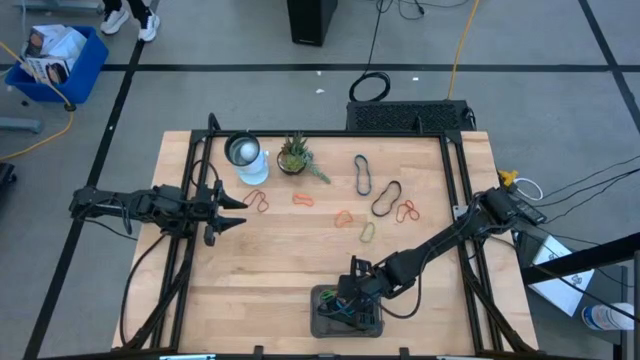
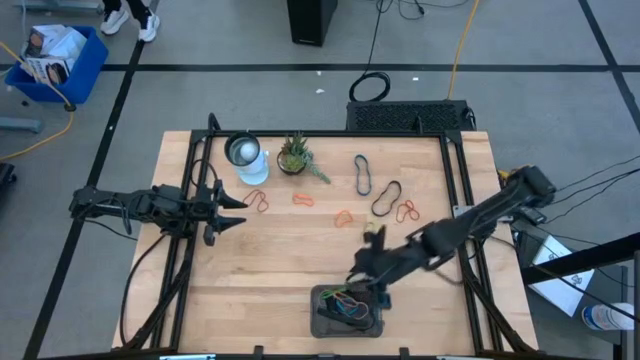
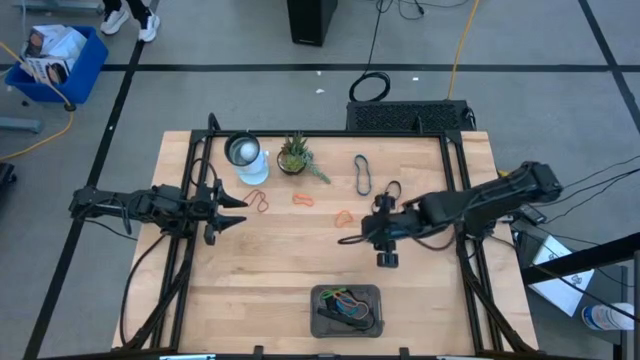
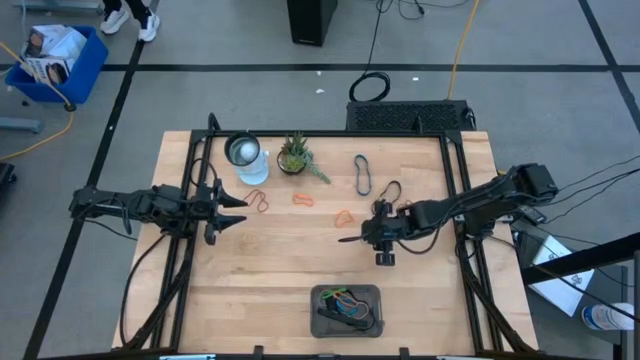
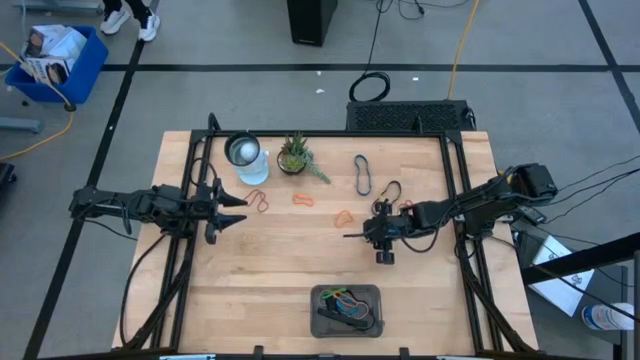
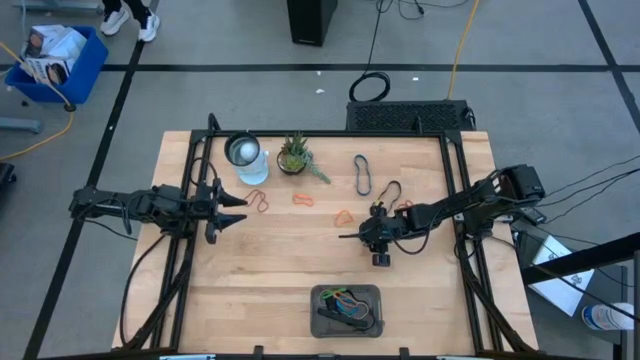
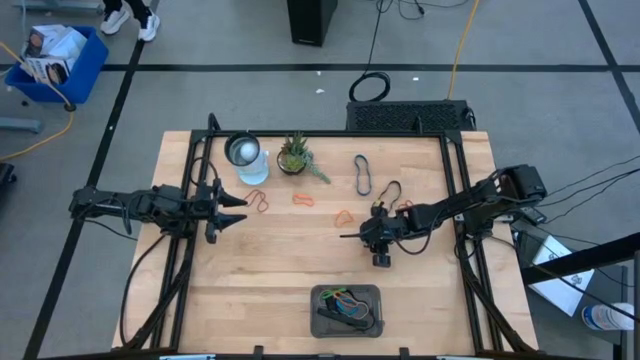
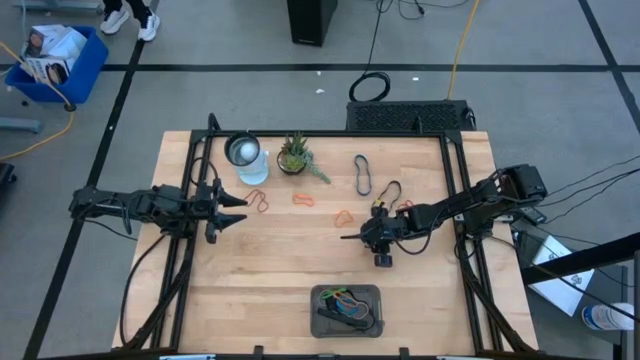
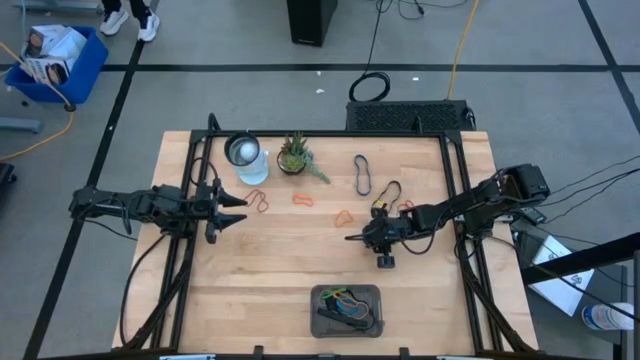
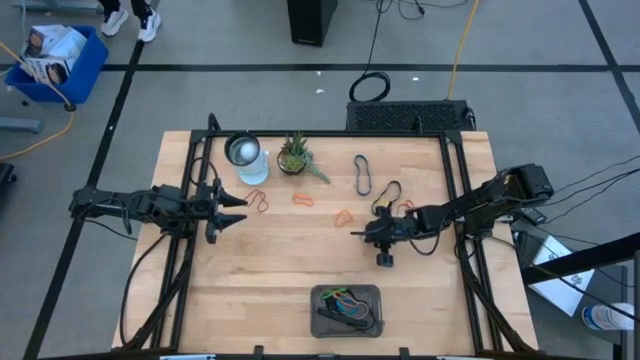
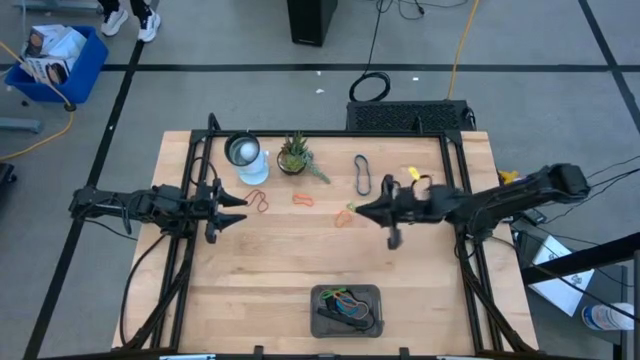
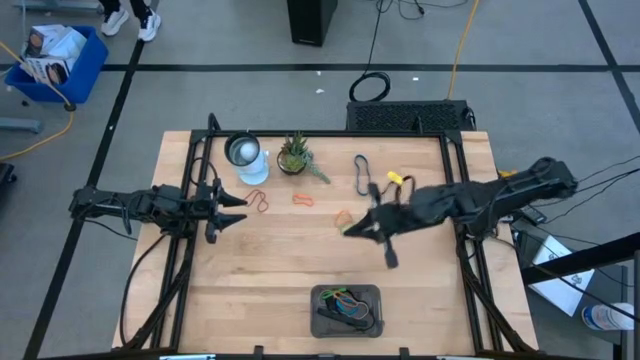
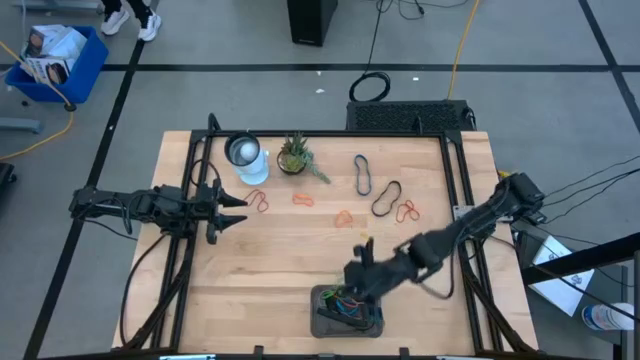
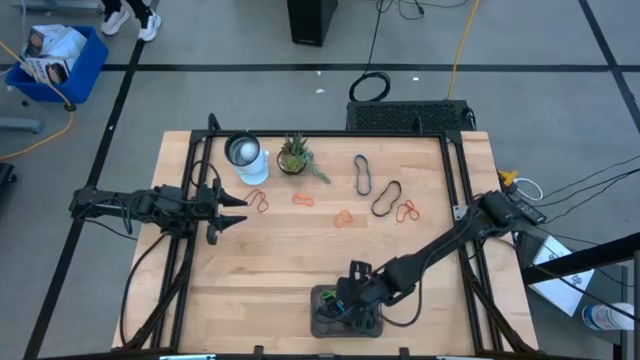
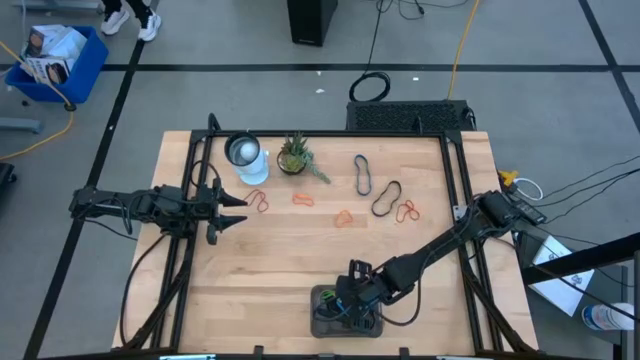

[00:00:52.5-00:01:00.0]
Task: Pick and place rubber bands into bin
Put the green rubber band into the black transparent bin

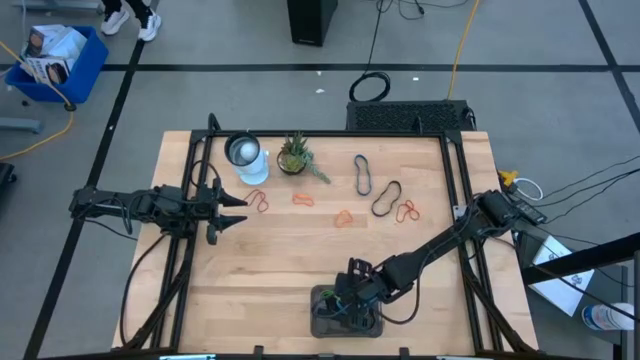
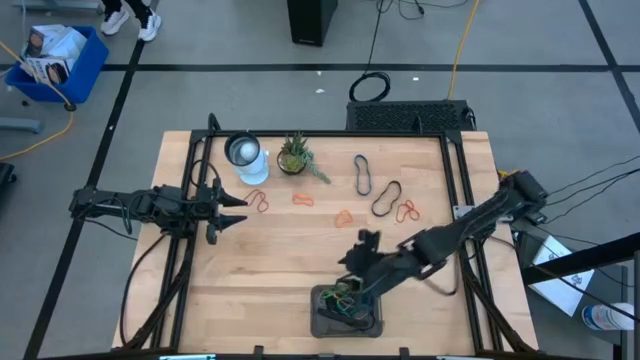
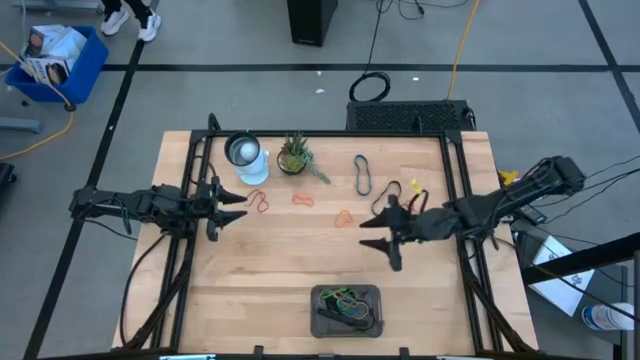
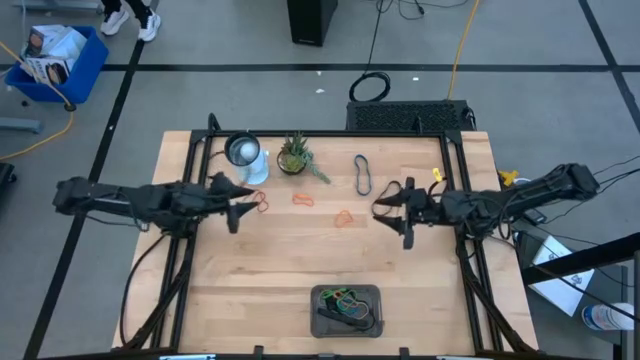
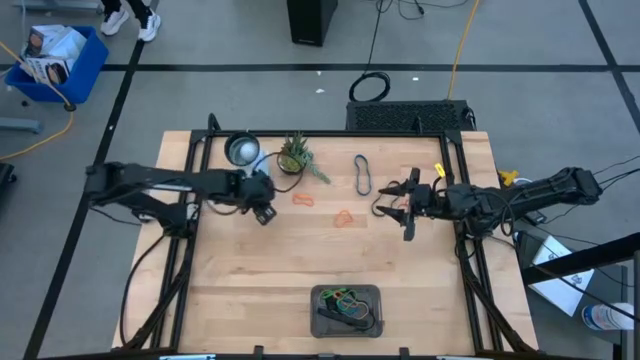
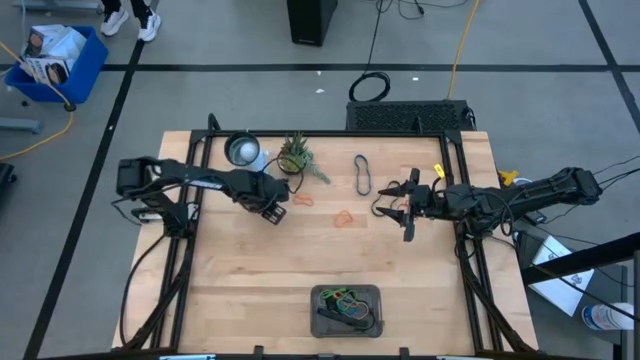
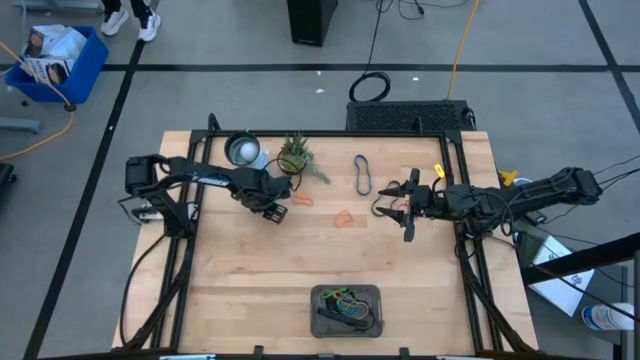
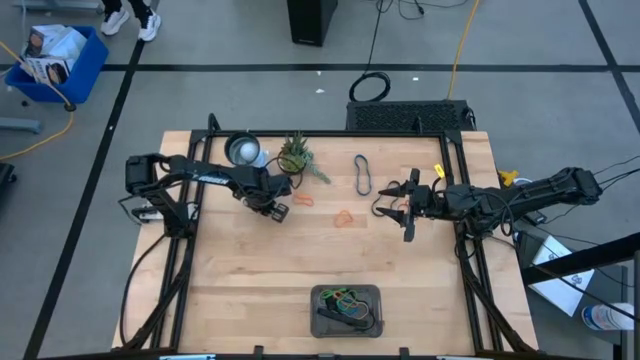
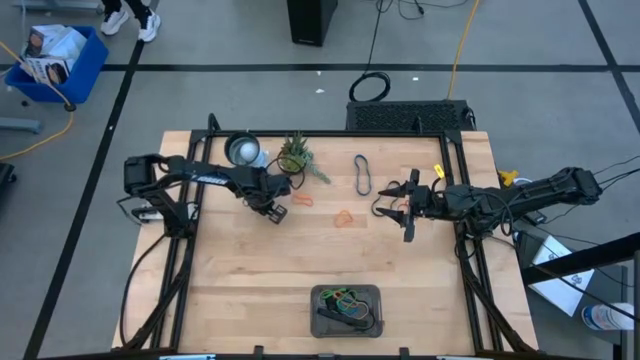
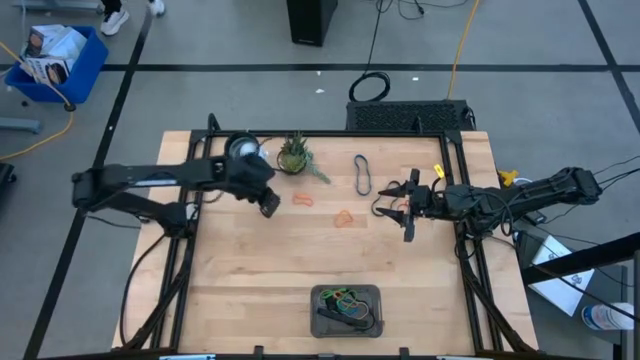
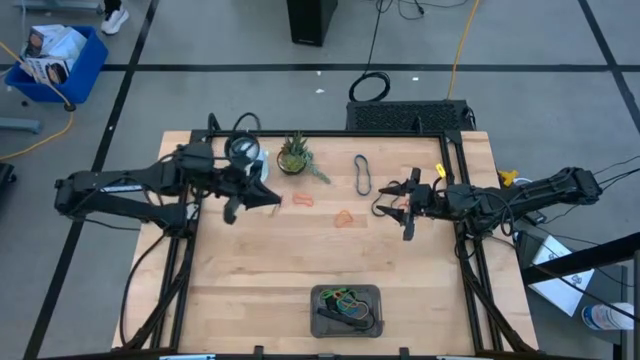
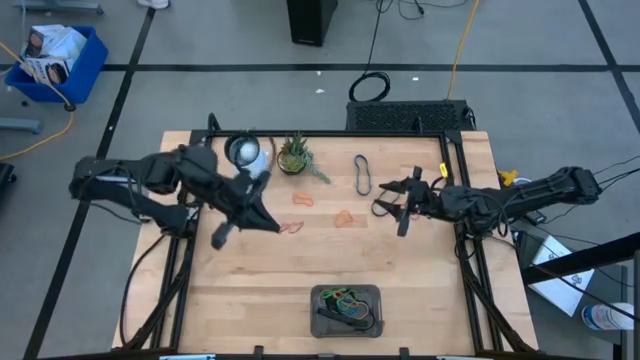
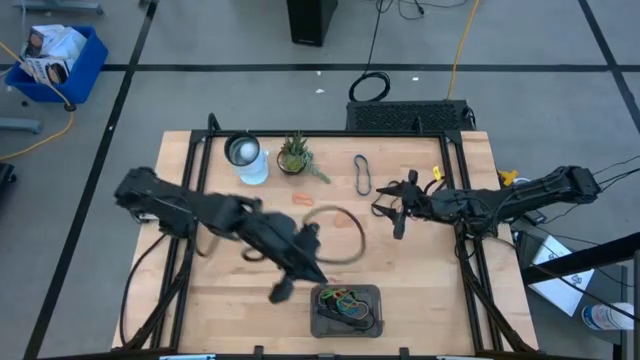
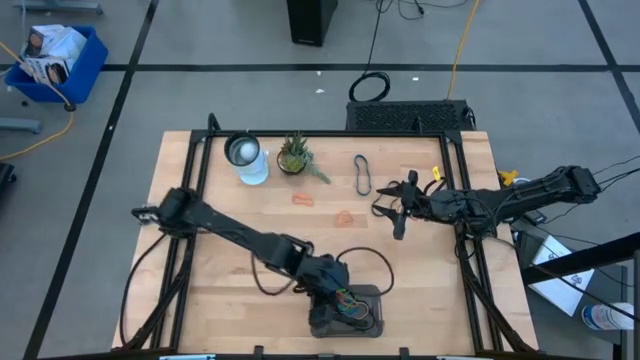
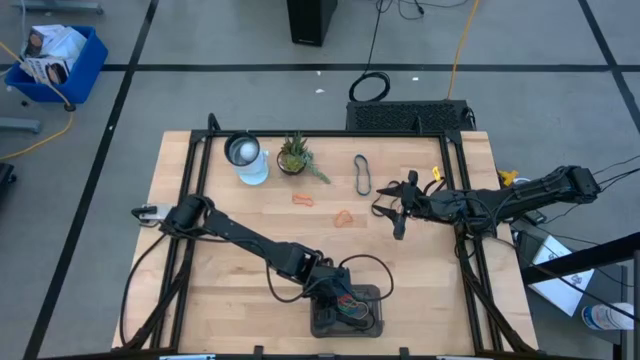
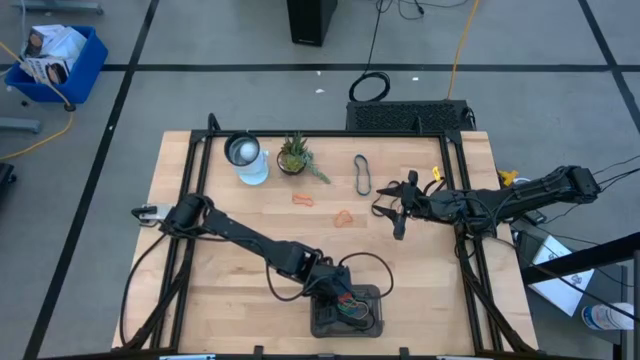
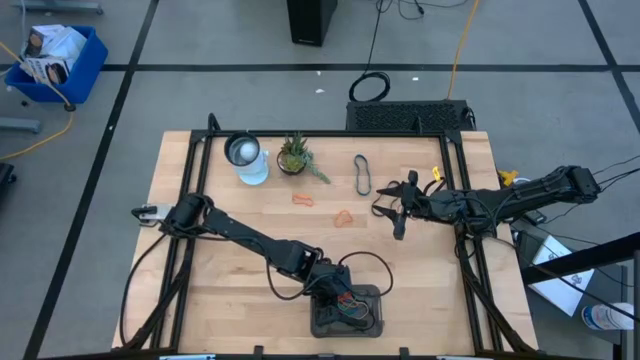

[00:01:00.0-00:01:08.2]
Put the red rubber band into the black transparent bin

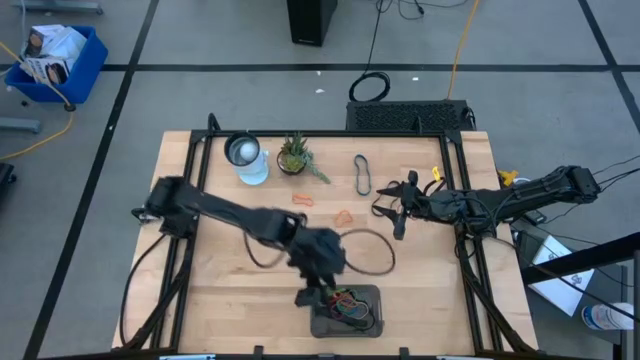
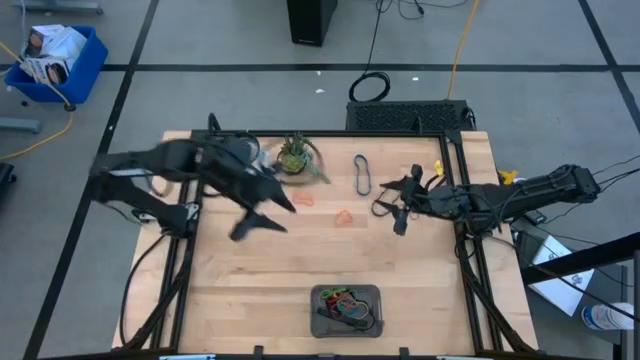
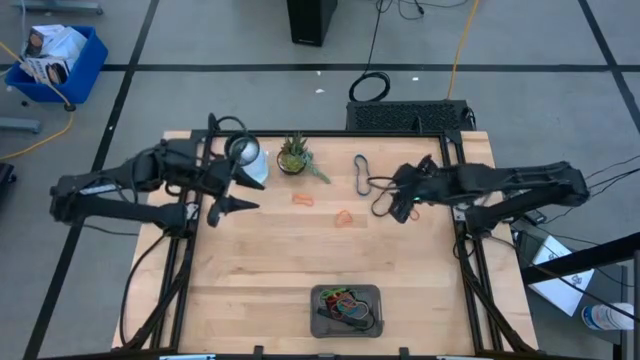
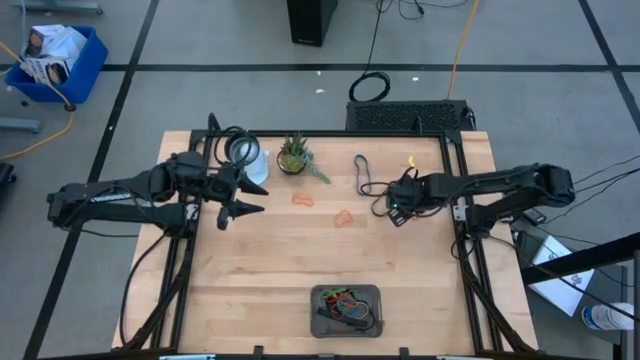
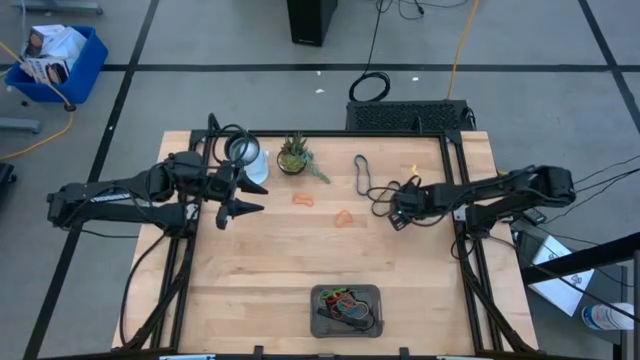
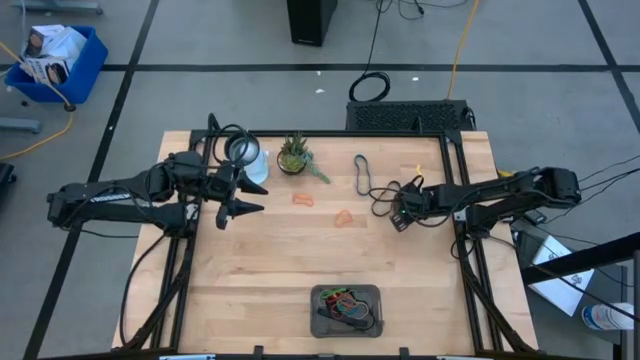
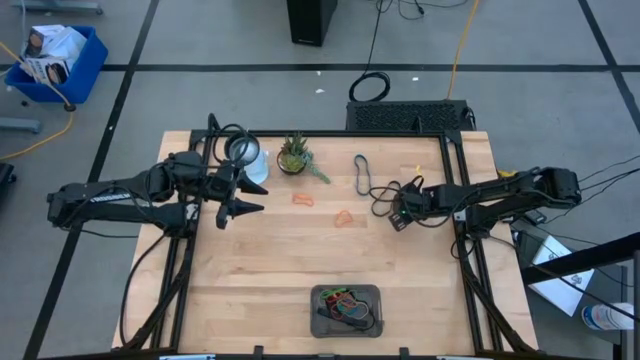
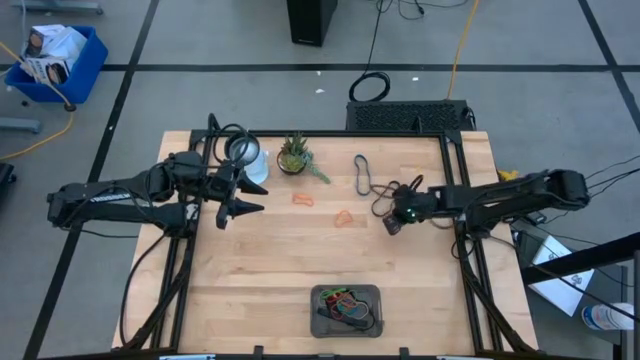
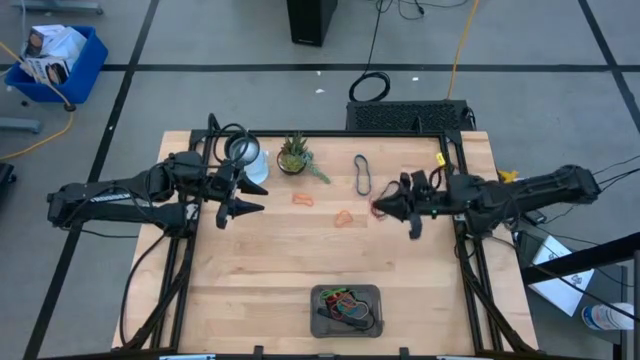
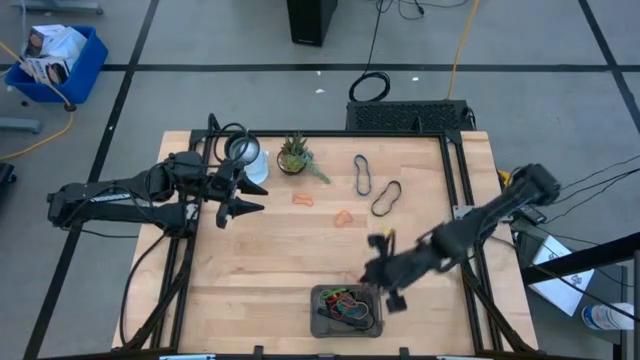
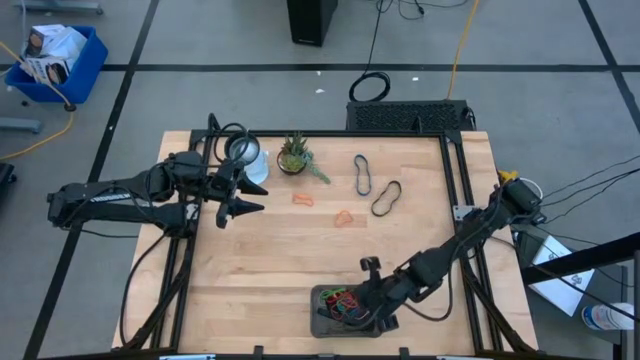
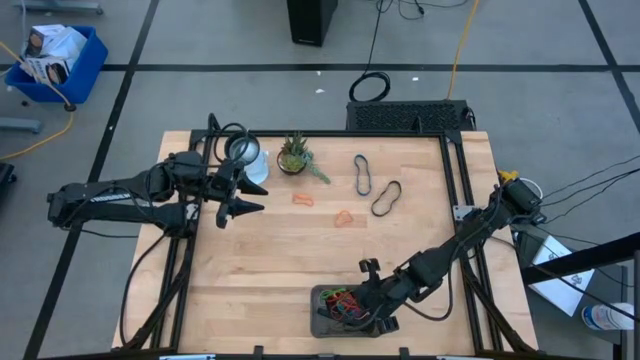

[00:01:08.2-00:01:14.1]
Put the red rubber band into the black transparent bin

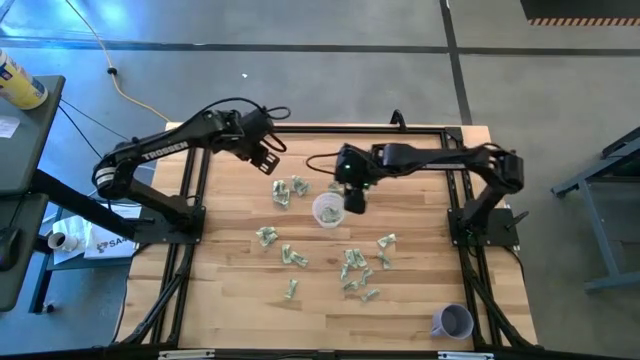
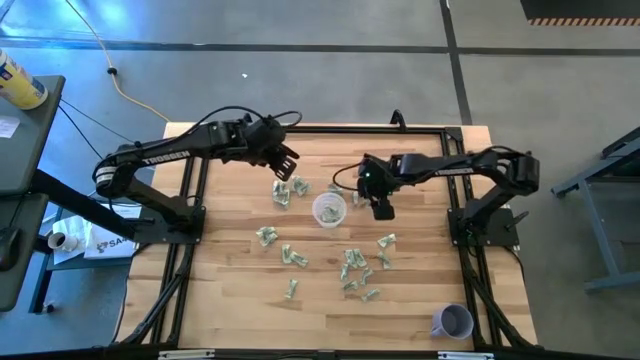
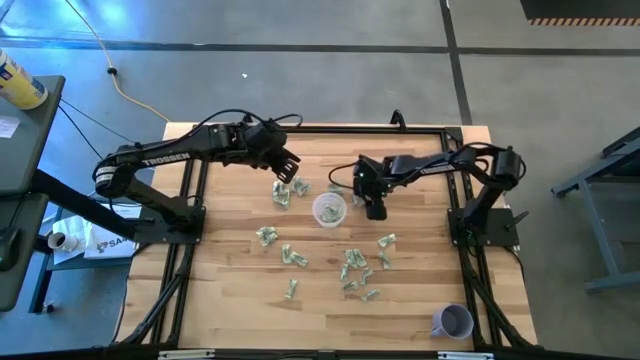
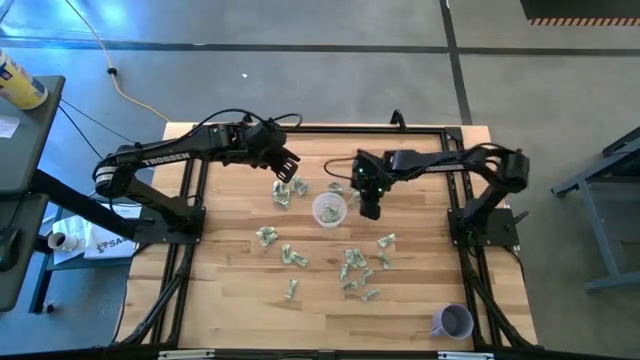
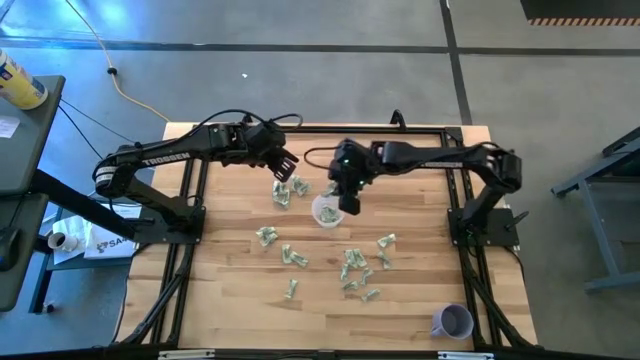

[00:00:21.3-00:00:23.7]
Task: Pick and place Stevia / Truvia into bins
Put the white stevia packet into the transparent container
